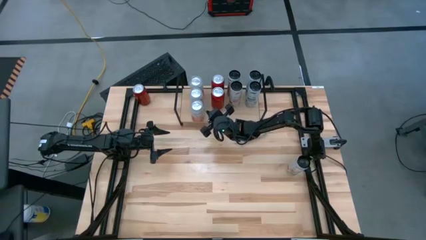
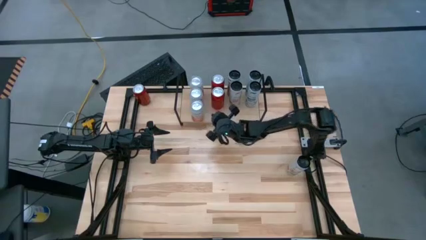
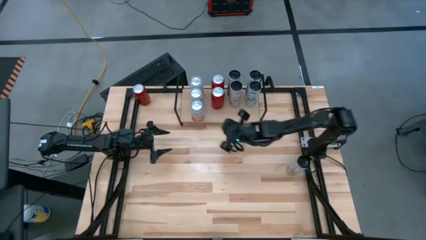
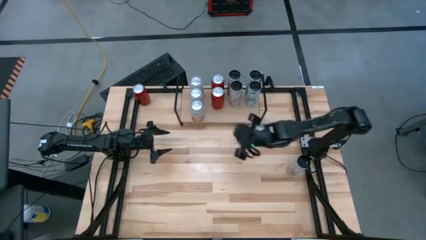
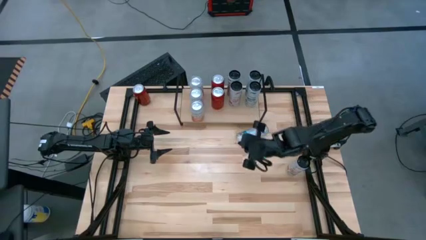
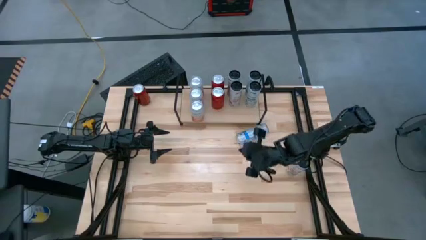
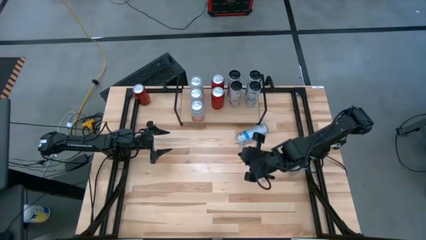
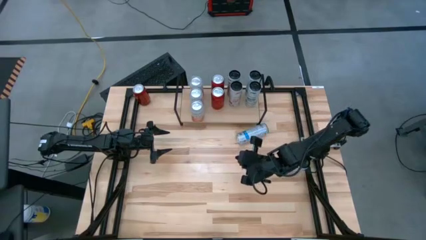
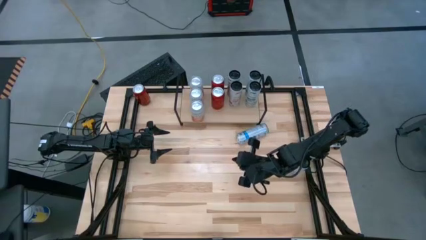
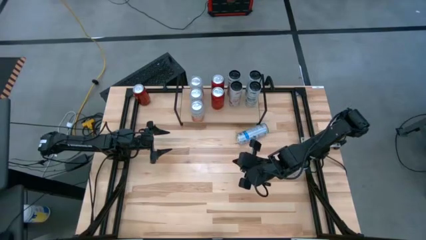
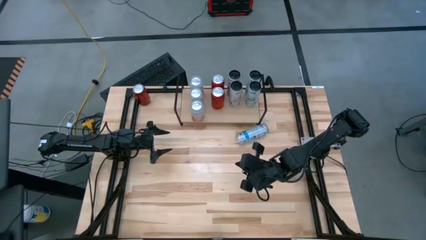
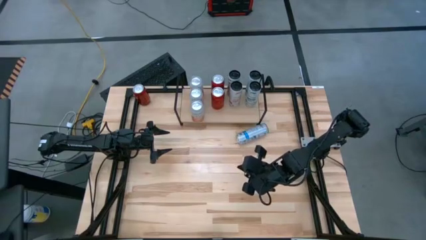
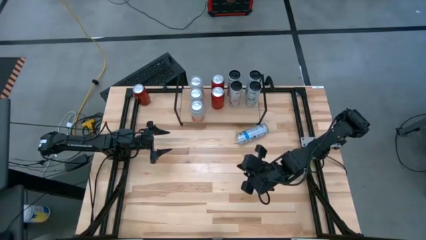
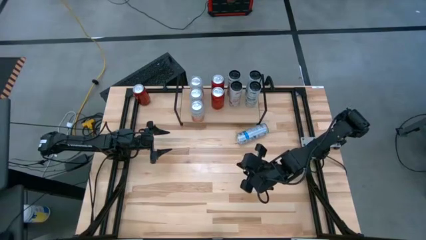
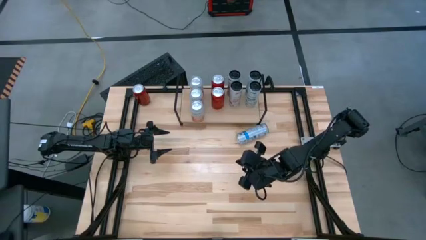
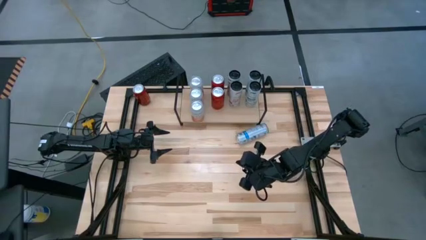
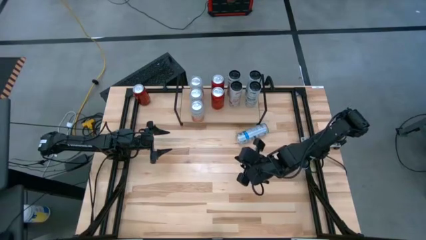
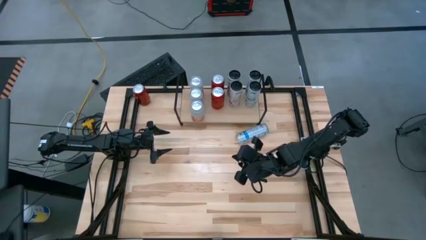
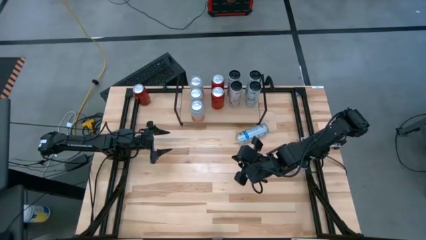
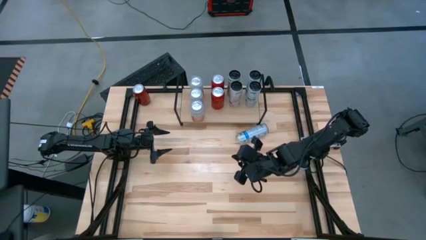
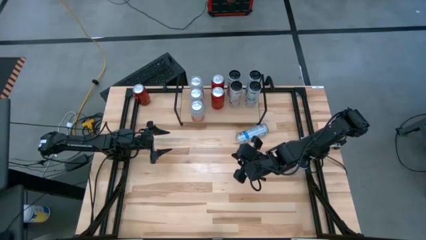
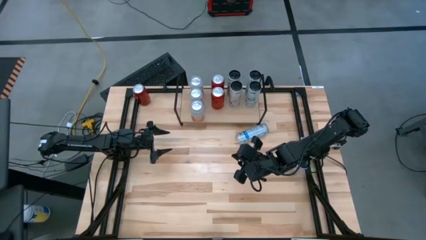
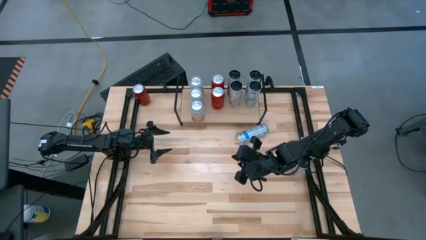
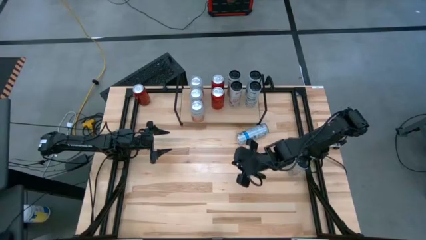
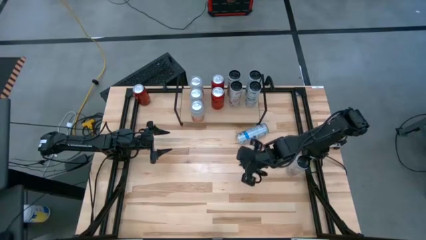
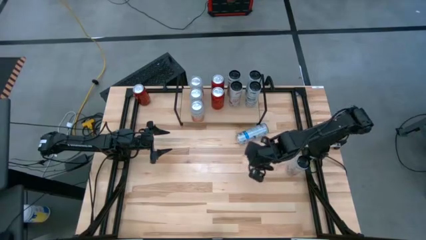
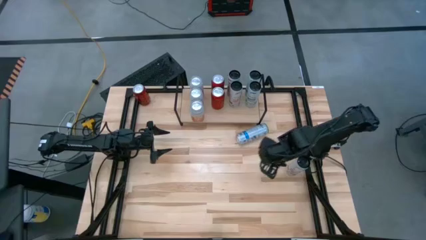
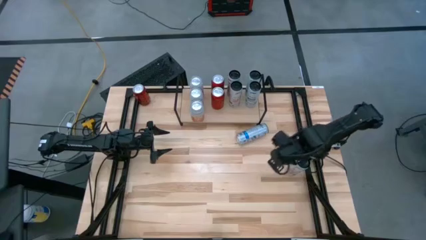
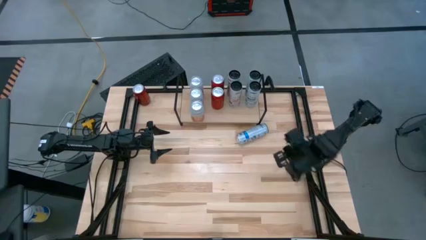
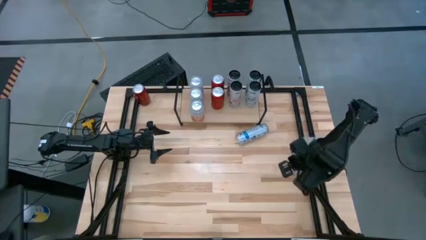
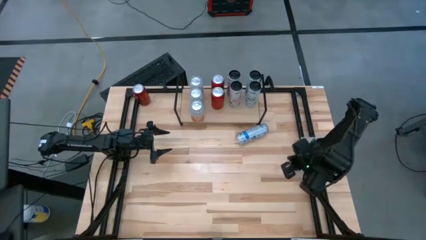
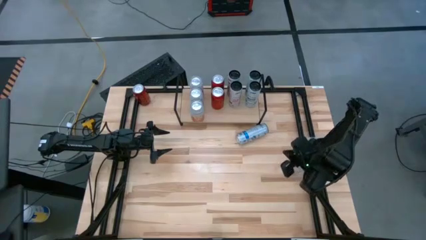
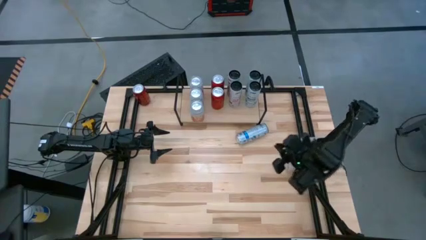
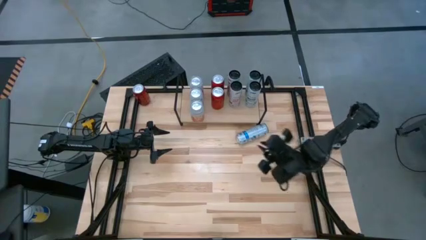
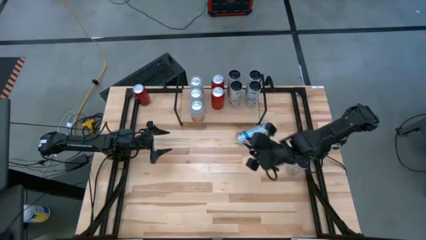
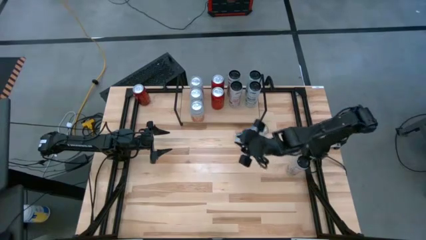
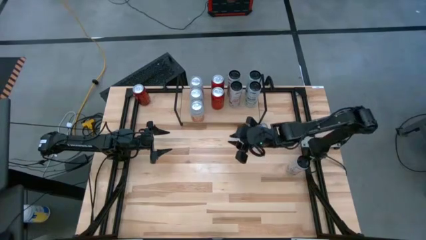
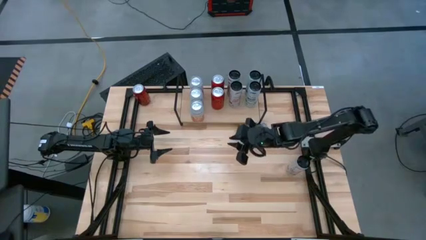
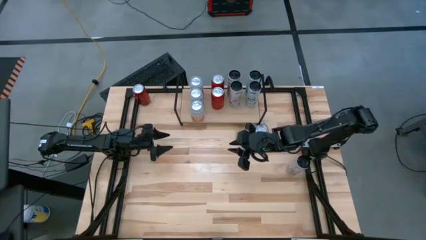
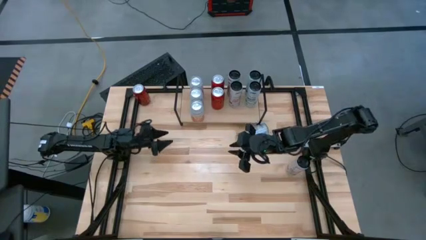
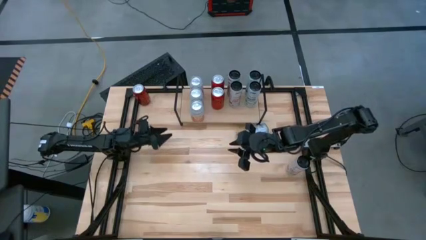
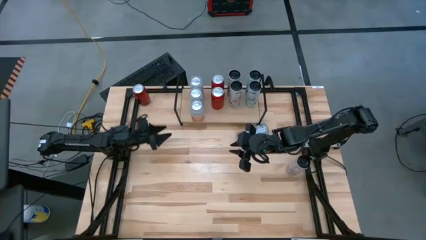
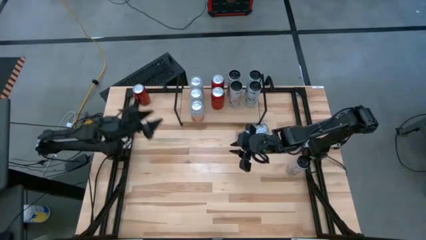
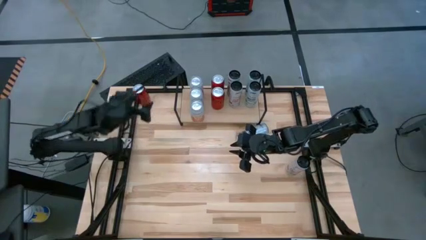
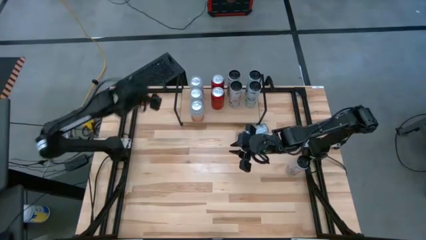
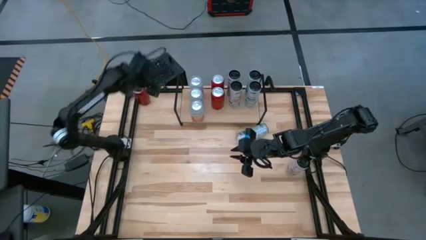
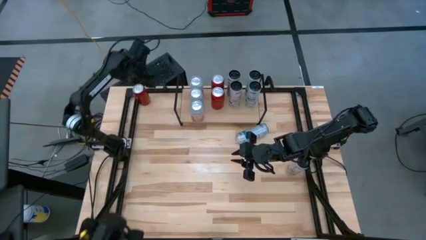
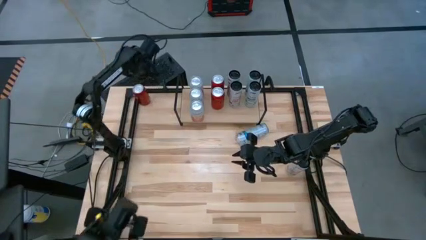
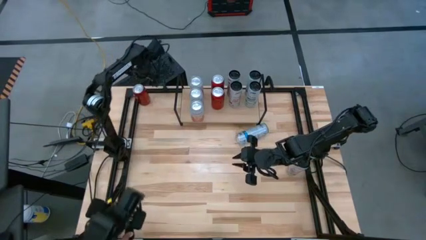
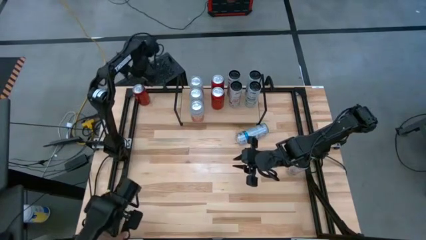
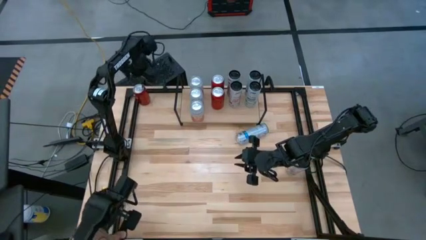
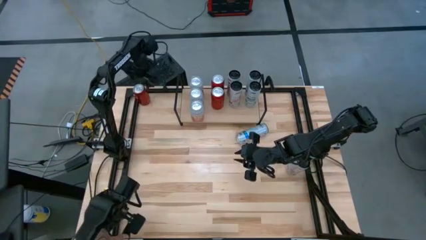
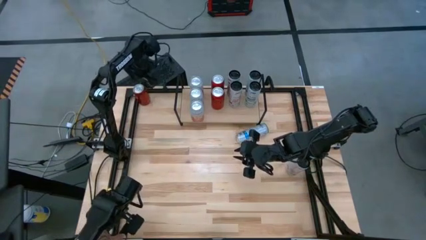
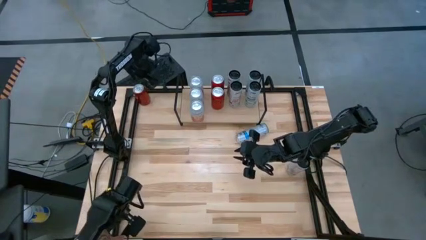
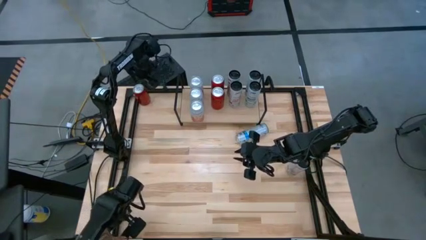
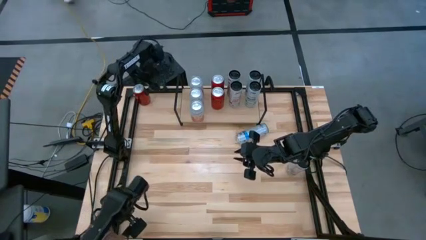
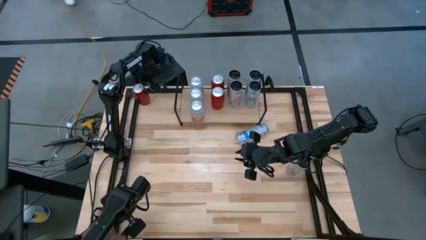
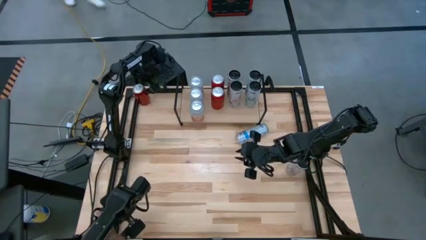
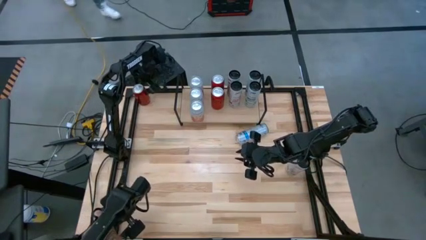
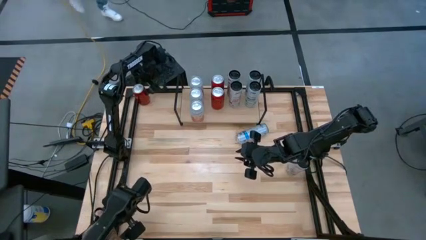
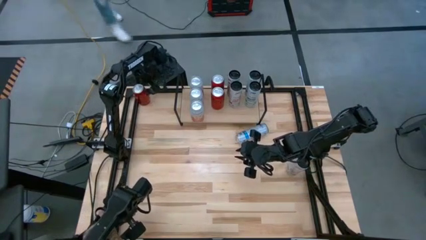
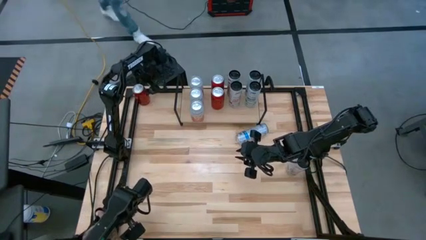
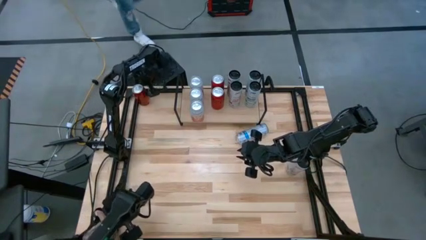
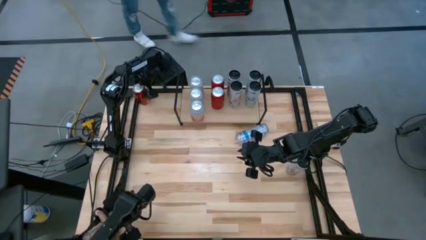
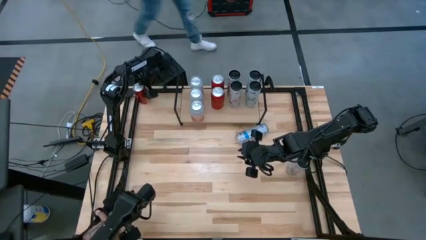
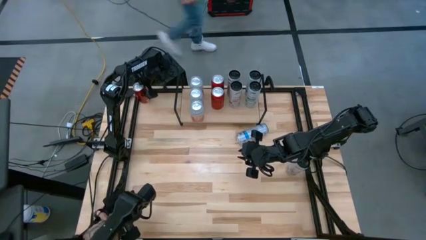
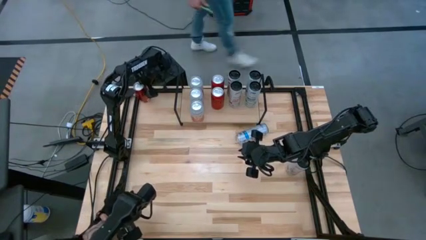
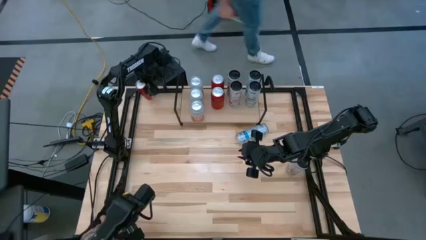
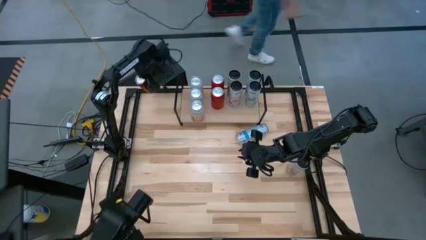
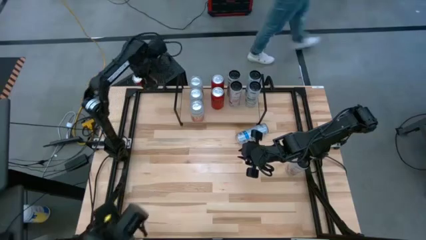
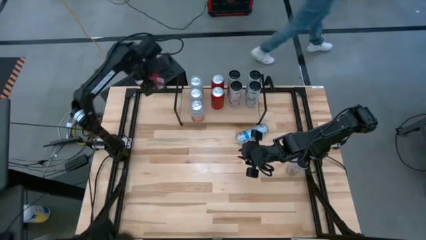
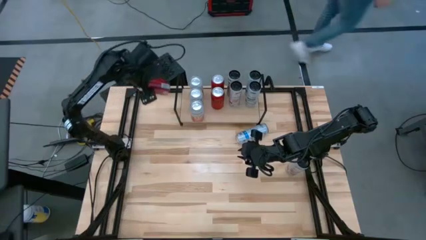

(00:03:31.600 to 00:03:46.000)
Task: Place canned beverage on shelf
Put the red black soda can on the shelf aligned with the other red black soda cans

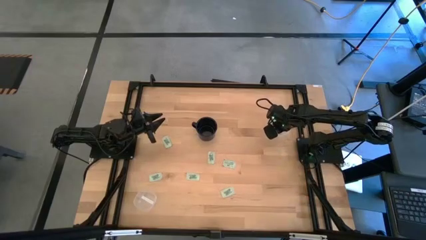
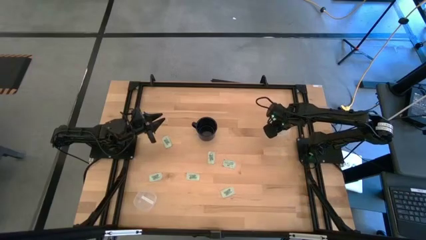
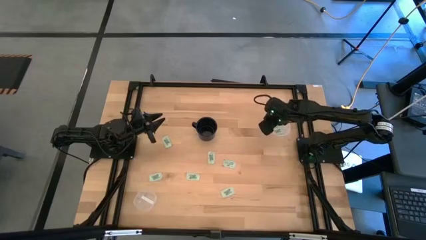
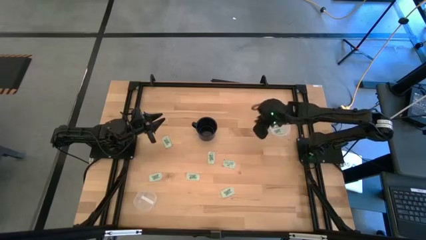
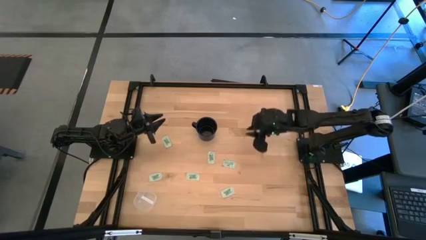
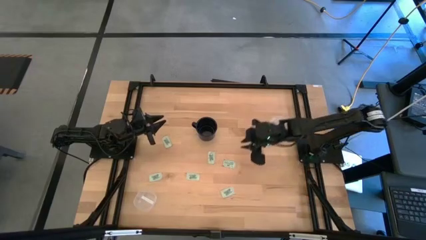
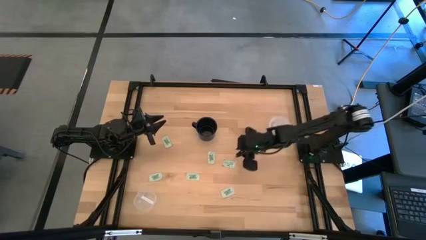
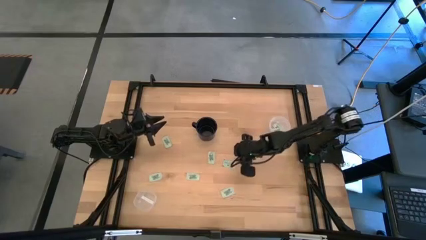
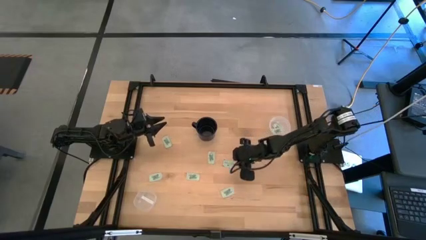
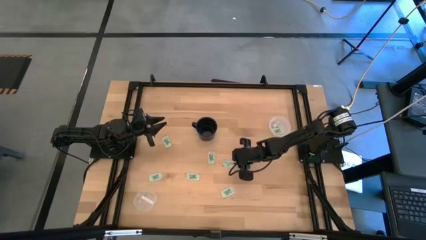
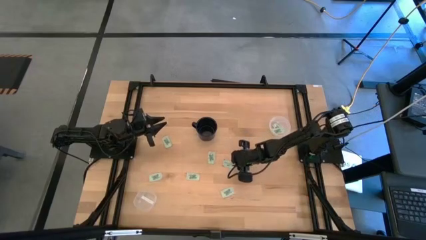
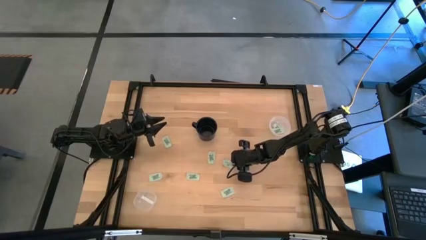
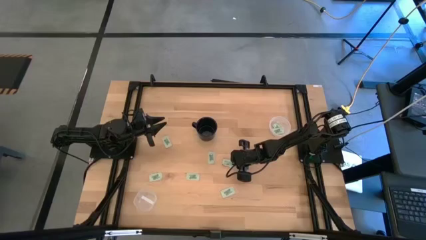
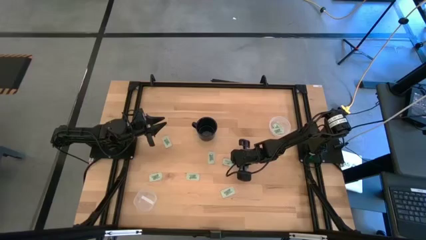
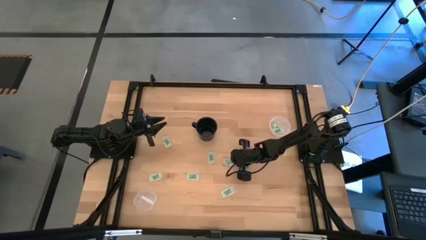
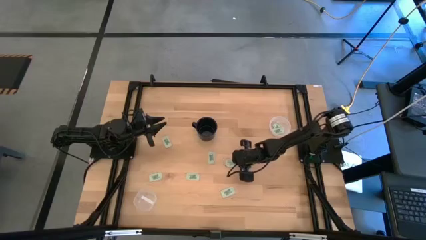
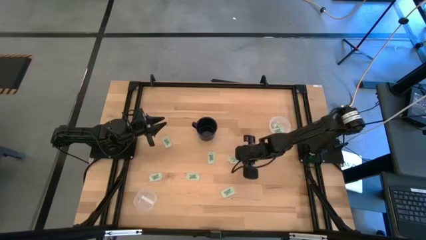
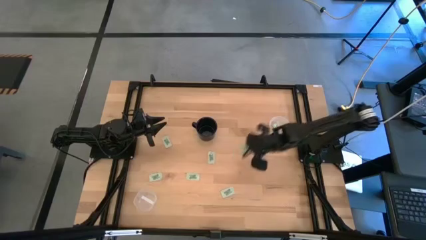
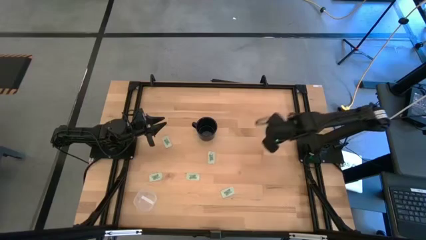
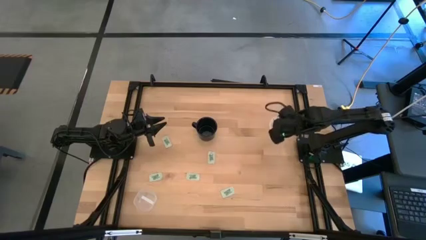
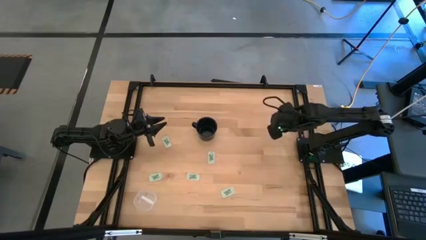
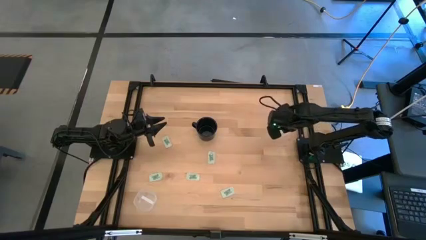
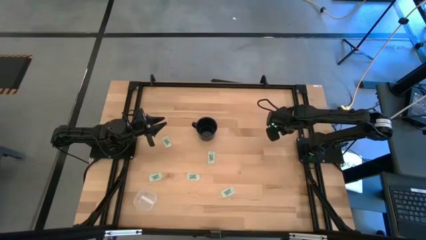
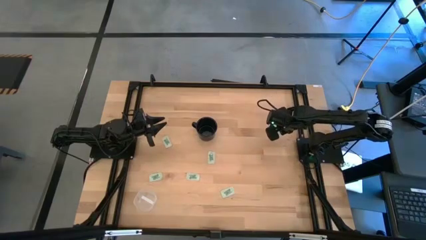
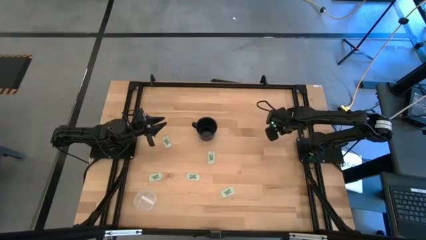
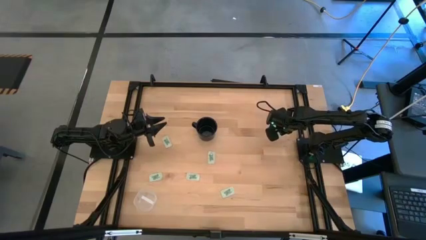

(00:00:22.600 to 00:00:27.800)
Task: Pick and place Stevia / Truvia into bins
Put the stevia packet into the round transparent container
